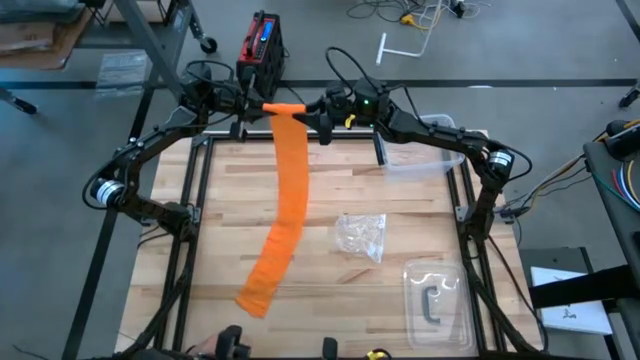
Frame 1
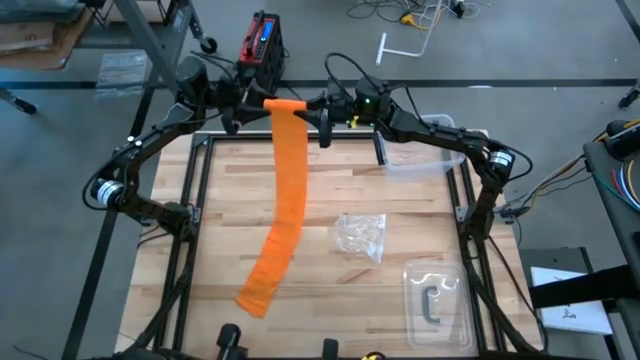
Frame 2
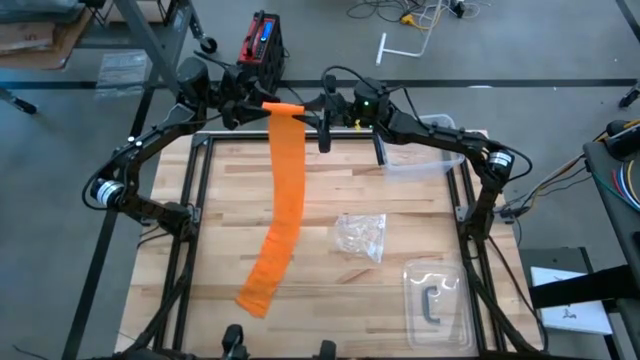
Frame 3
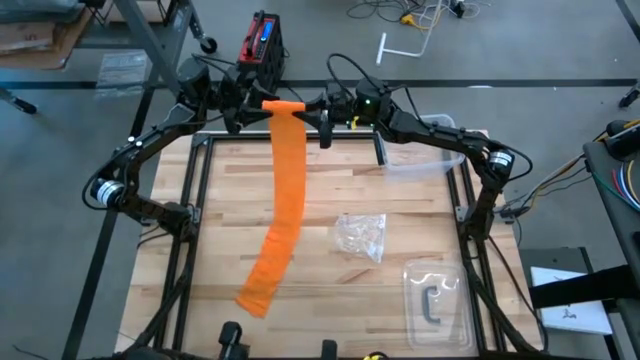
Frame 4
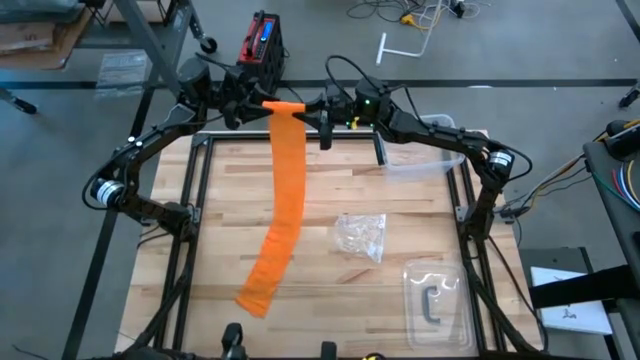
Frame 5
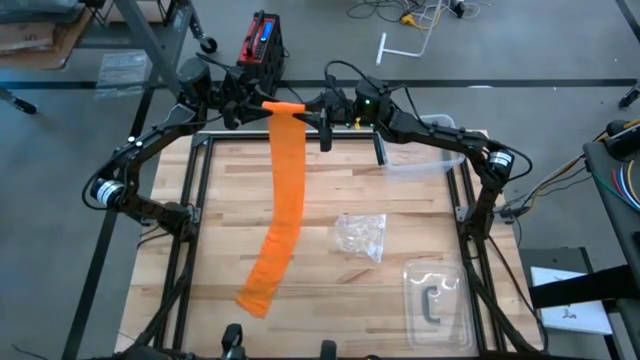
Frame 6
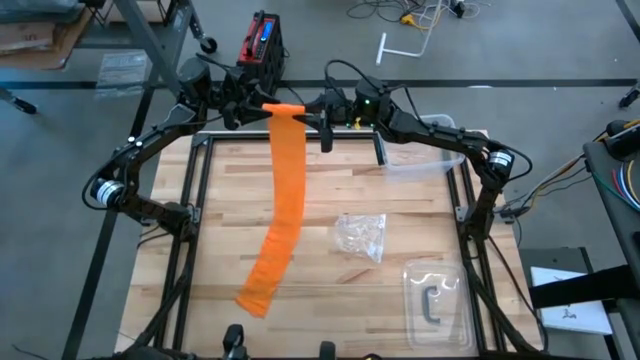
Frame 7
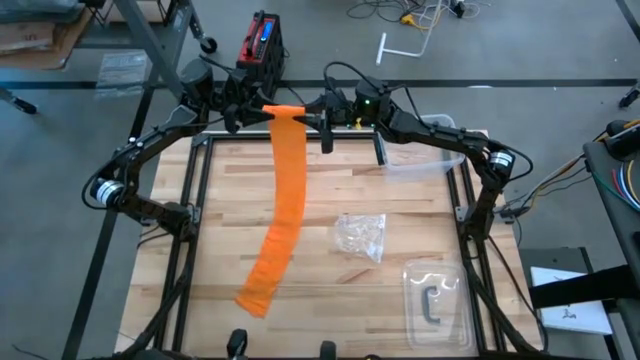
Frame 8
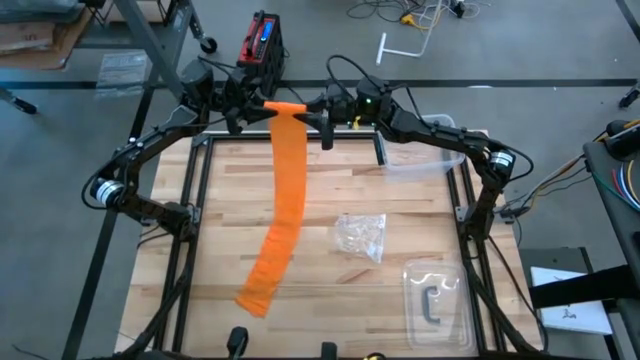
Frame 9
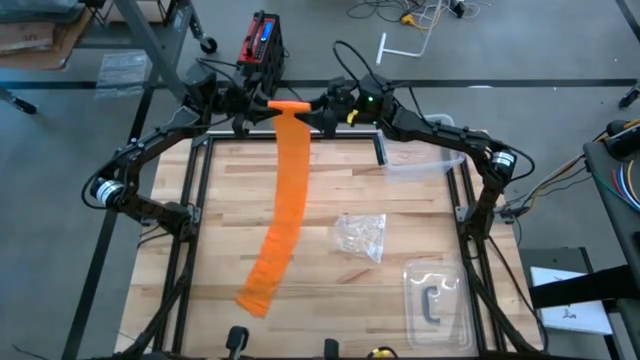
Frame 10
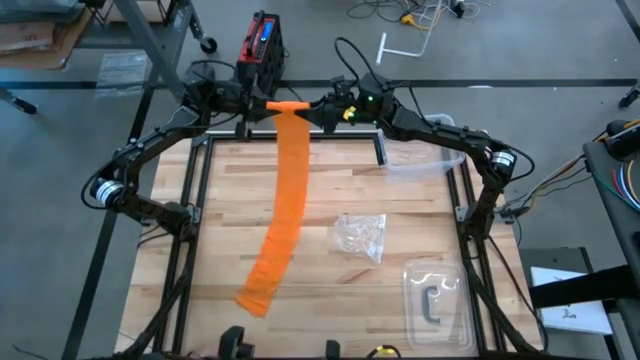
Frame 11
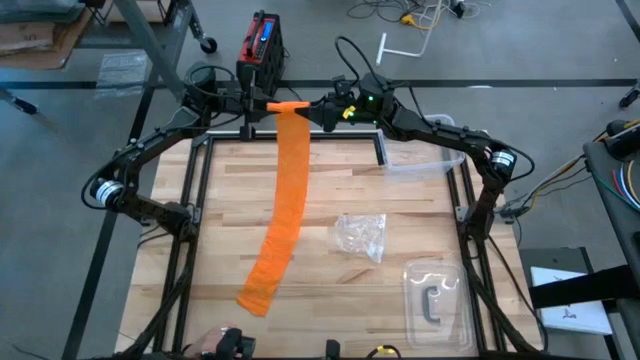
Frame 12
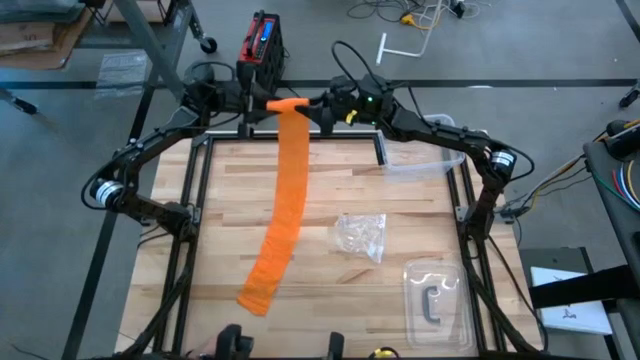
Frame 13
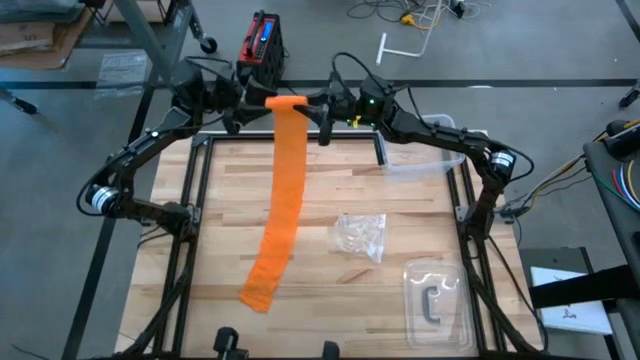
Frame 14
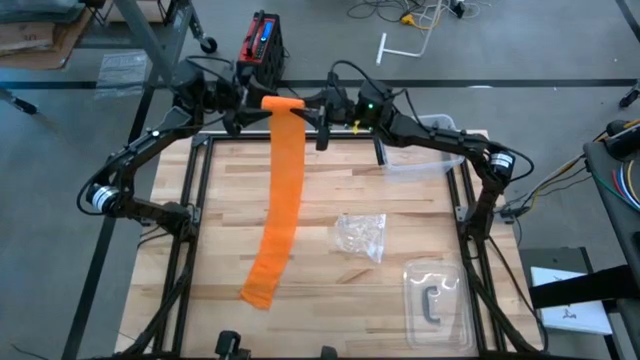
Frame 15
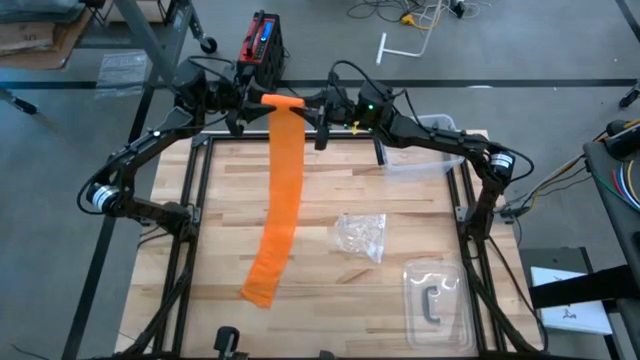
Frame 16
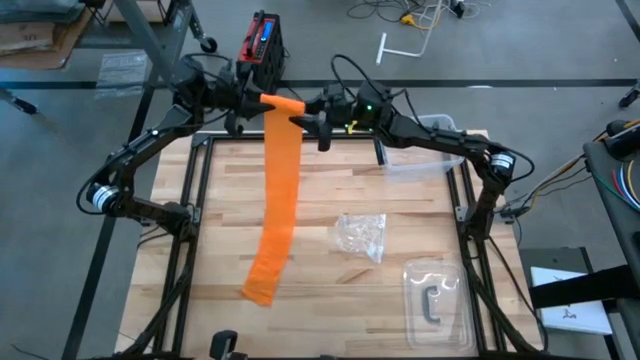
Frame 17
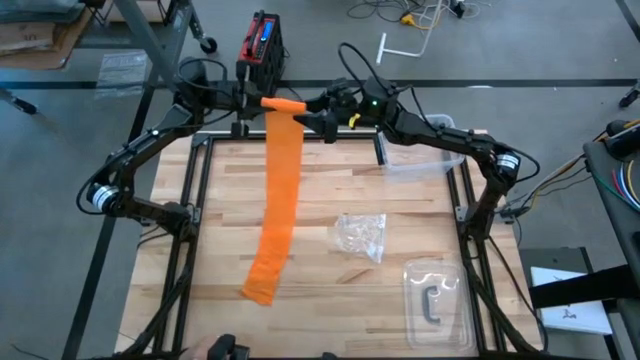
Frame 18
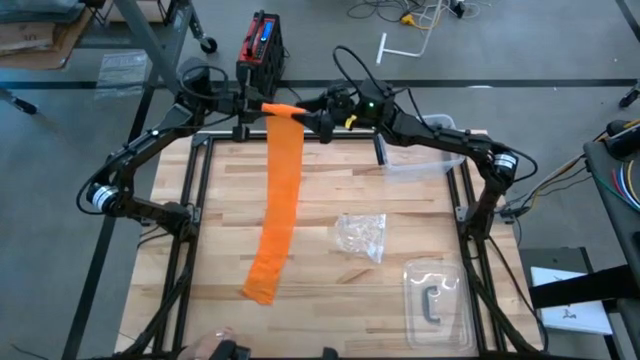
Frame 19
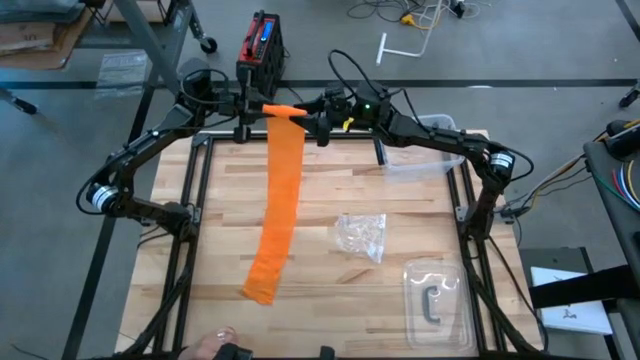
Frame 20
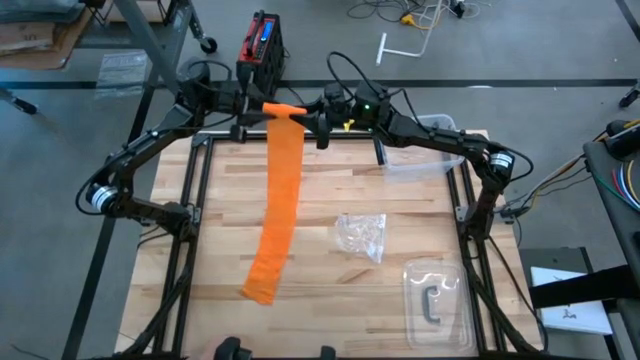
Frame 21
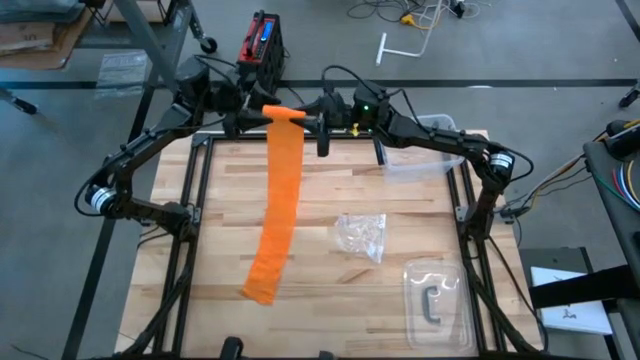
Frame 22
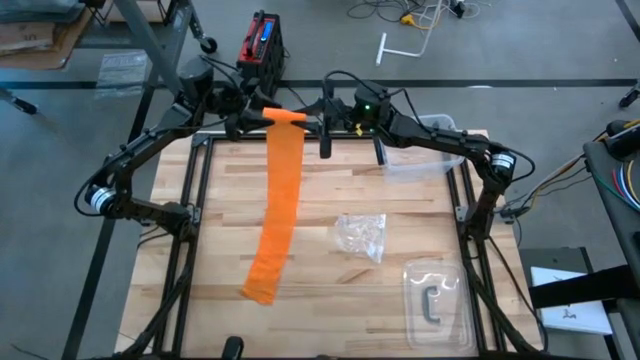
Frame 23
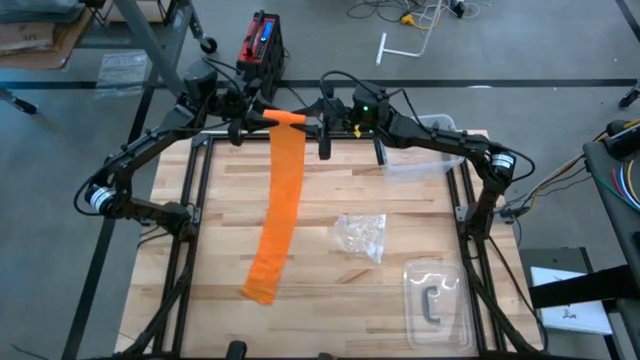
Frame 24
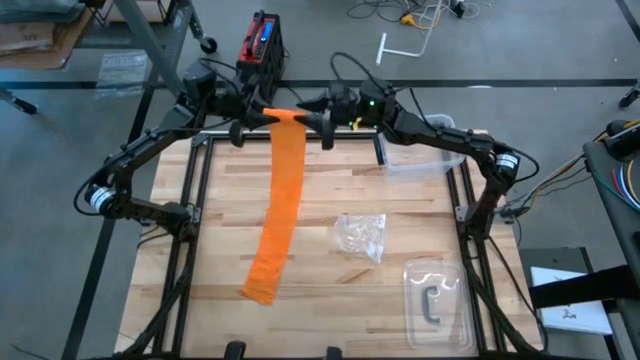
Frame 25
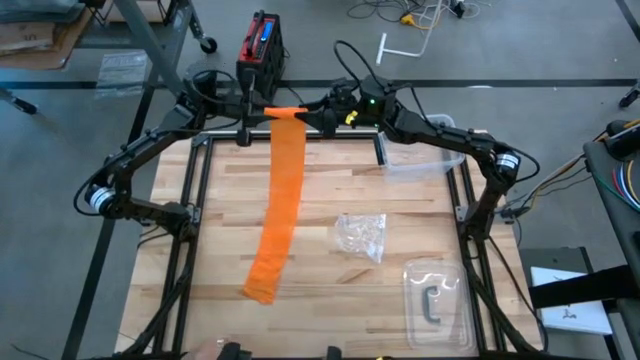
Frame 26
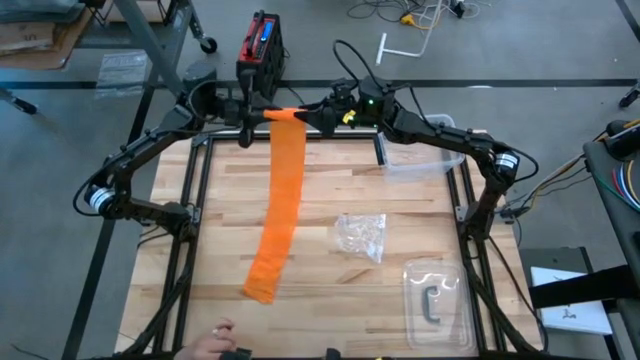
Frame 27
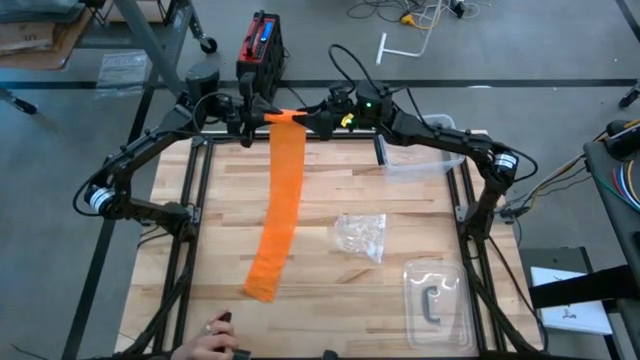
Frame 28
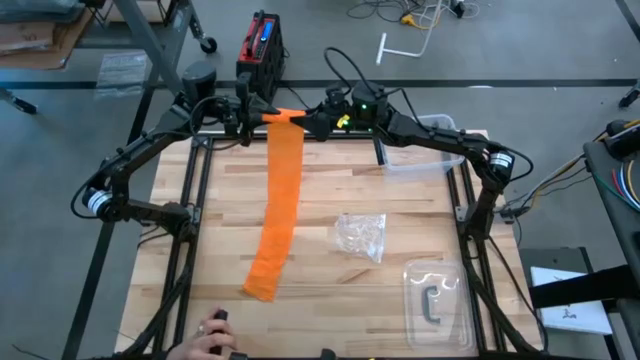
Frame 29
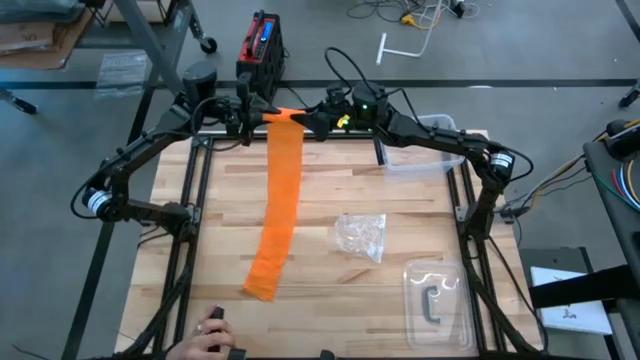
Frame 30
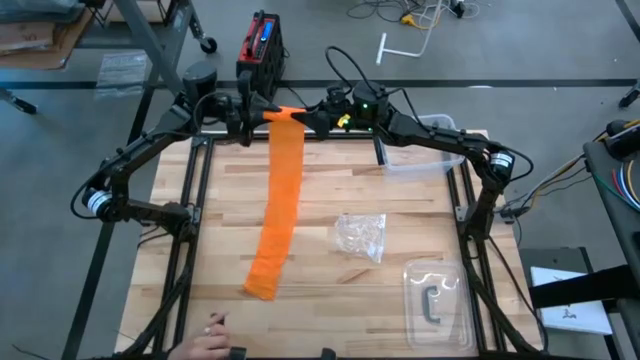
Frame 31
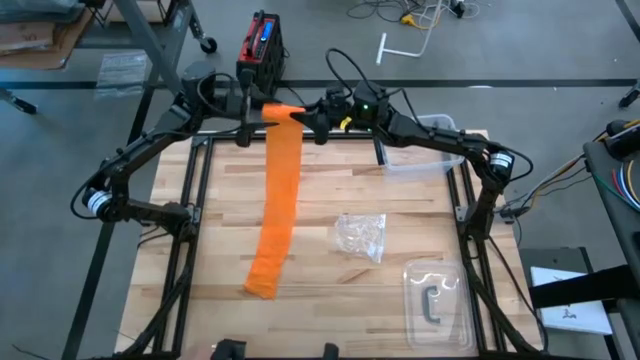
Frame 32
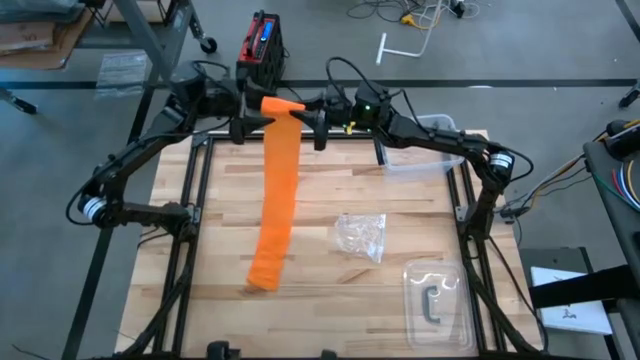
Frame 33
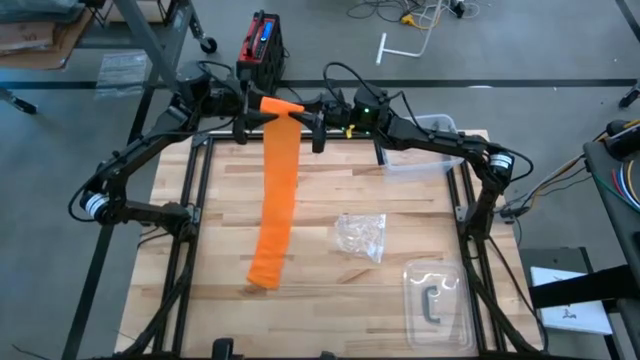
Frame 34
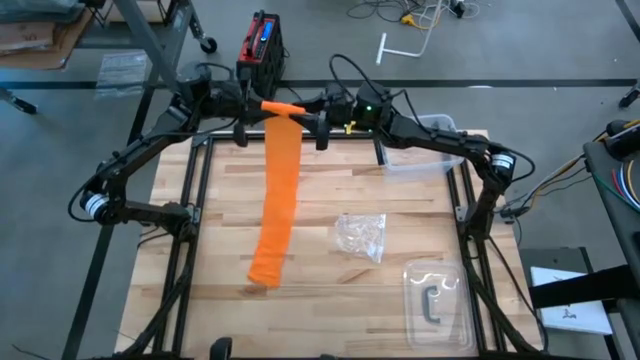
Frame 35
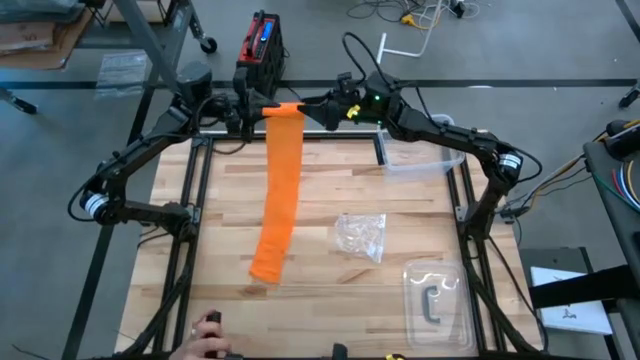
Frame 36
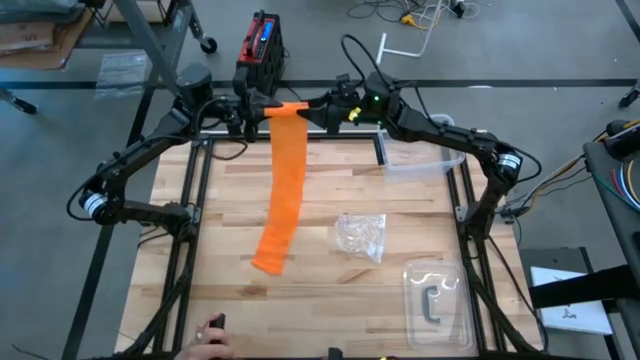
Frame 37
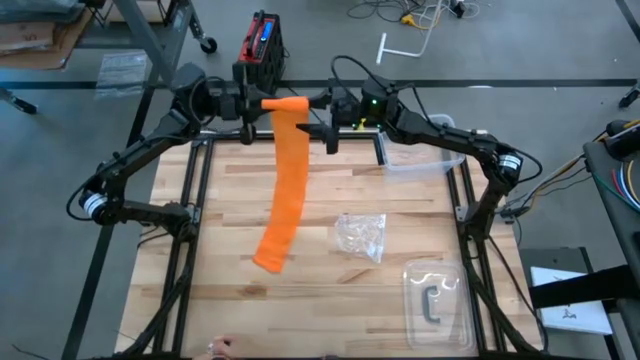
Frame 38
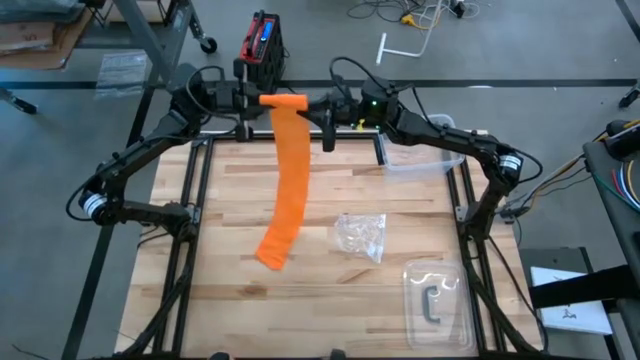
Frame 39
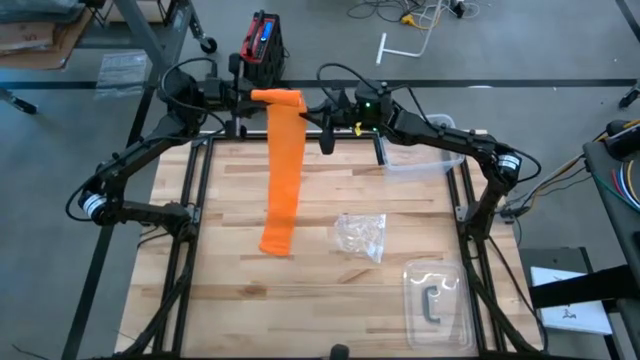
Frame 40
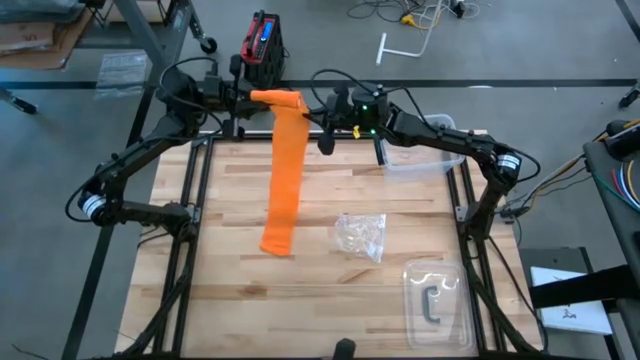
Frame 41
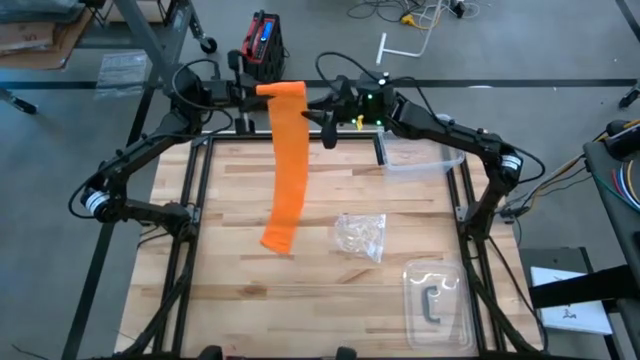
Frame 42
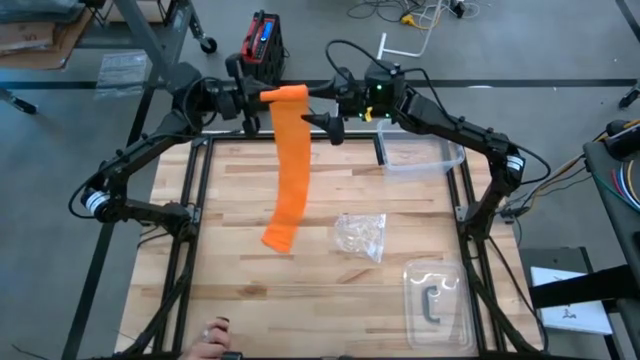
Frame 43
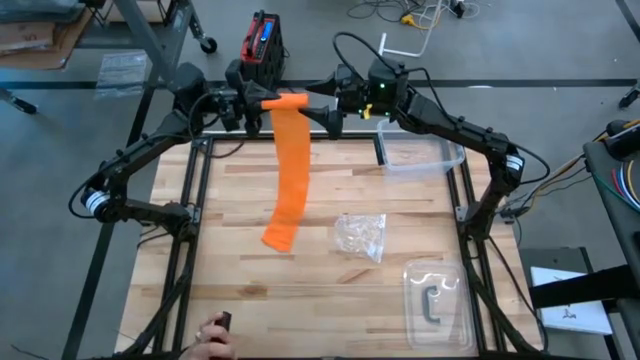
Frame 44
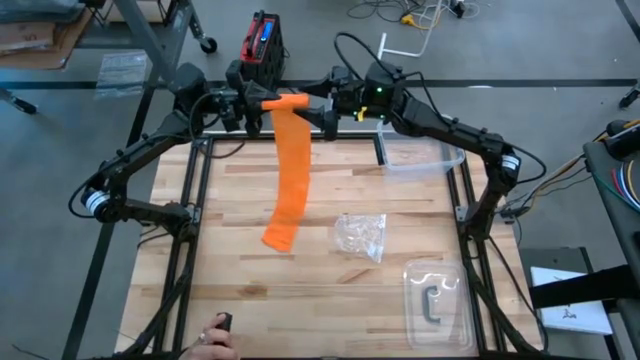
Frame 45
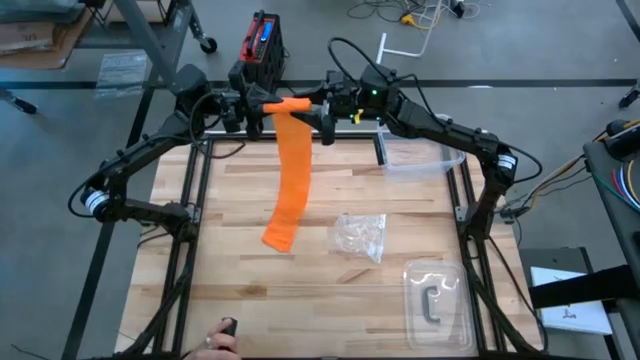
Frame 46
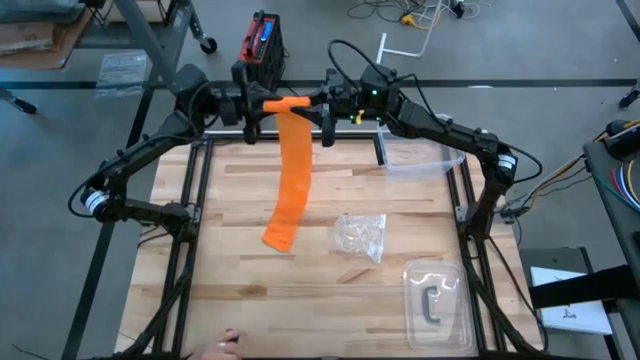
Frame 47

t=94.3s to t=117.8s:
Task: Roll bandage
Roll the orange bandage
